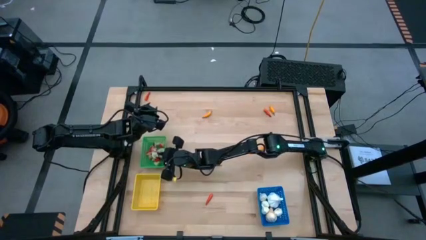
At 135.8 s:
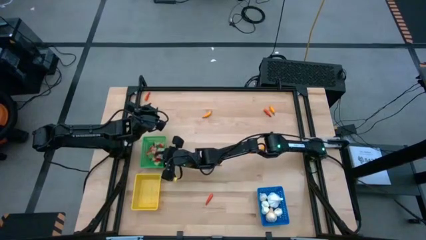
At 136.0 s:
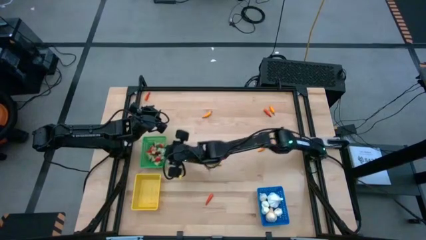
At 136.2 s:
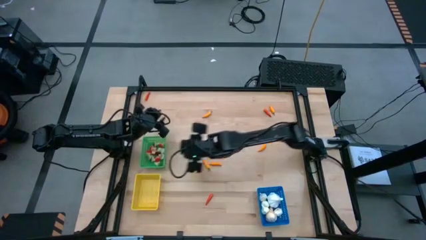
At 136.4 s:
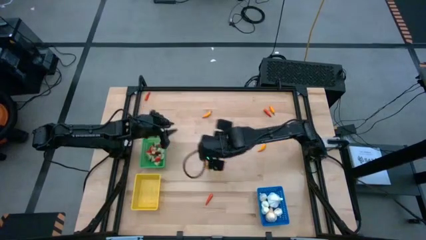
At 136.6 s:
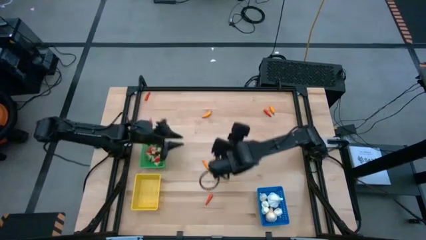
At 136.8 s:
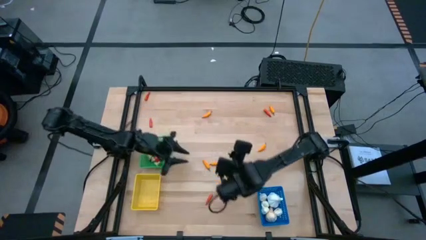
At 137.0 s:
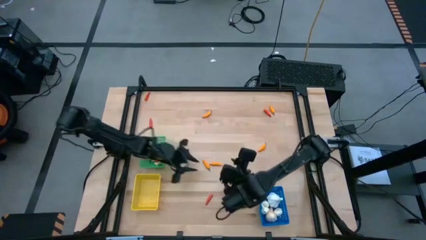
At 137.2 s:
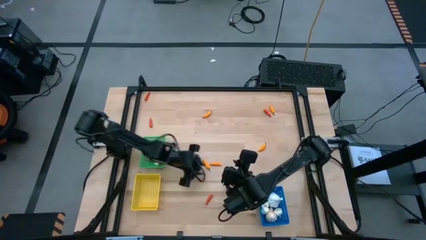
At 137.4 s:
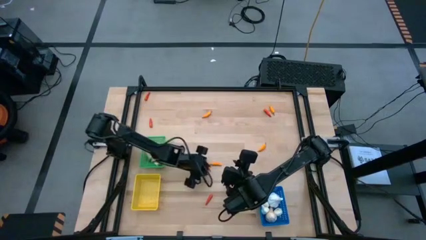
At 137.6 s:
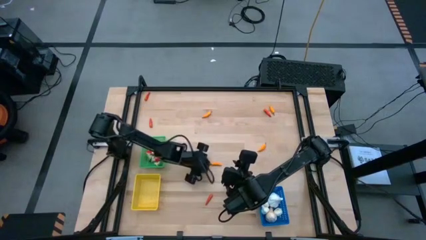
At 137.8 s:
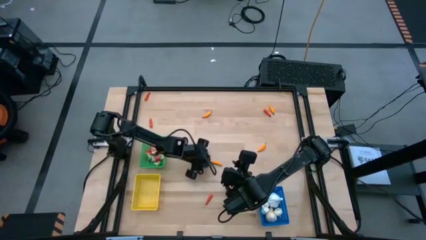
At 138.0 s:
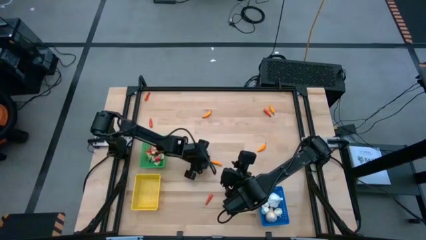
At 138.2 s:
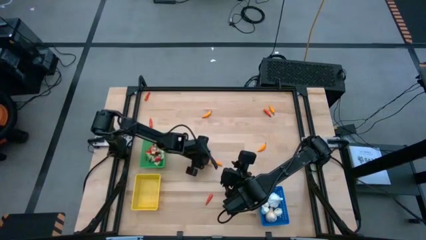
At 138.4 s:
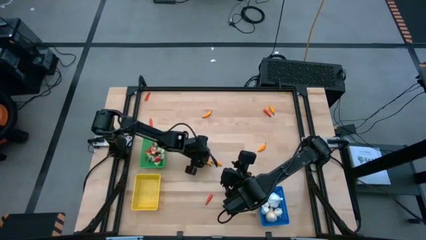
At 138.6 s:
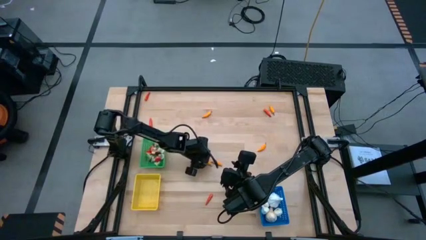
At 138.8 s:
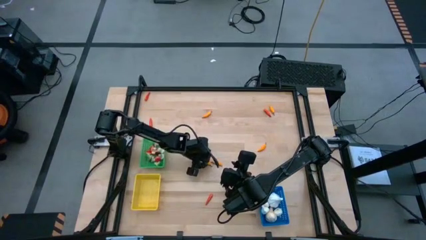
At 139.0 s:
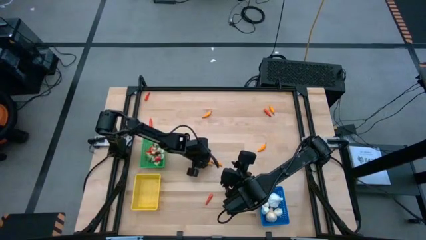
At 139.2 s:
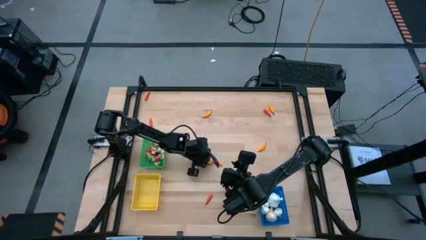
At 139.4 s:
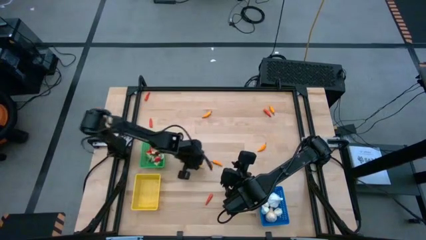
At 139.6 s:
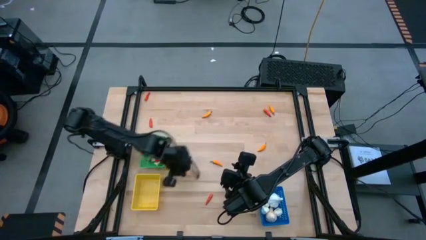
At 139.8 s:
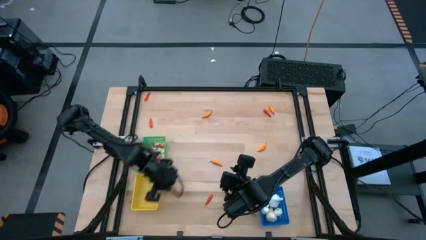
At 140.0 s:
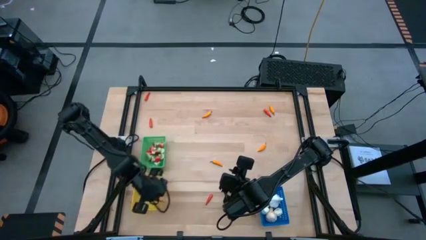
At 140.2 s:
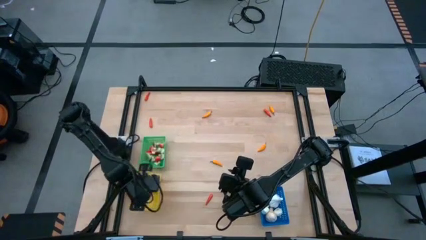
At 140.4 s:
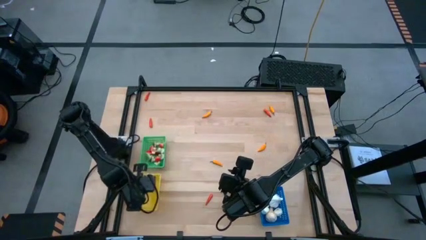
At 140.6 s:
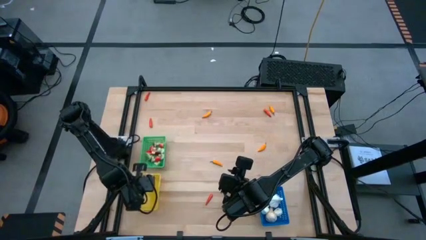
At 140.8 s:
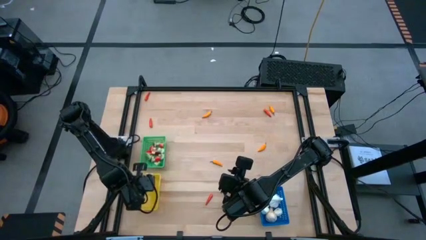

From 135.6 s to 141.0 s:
Task: Sort produce into baskets
Put the yellow chili pepper into the yellow bin

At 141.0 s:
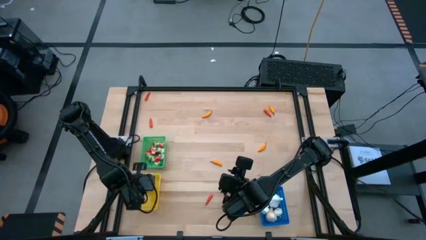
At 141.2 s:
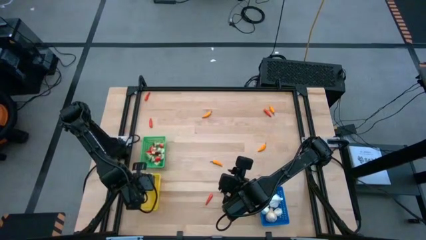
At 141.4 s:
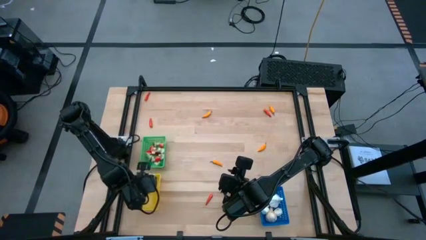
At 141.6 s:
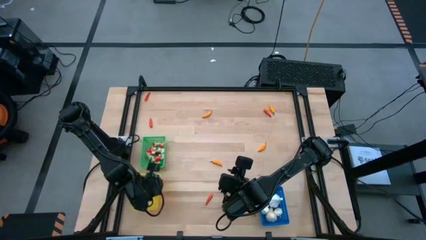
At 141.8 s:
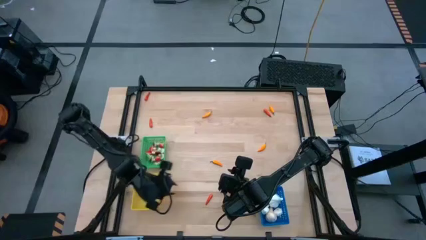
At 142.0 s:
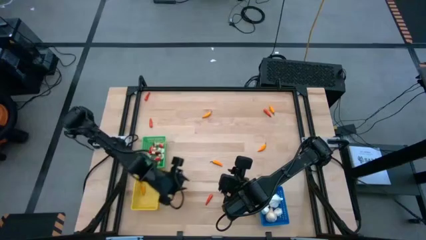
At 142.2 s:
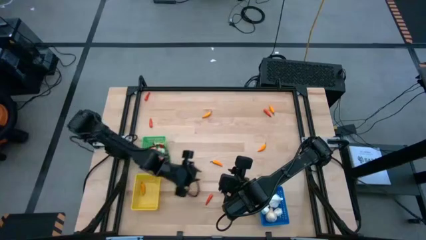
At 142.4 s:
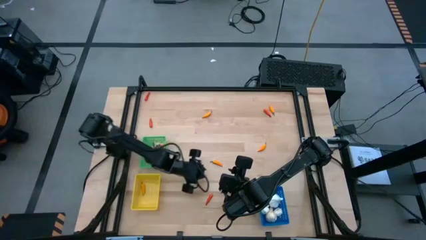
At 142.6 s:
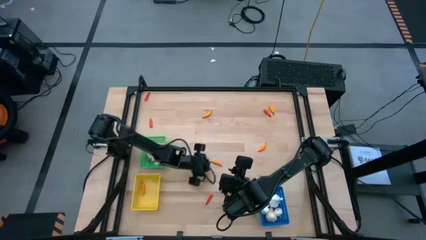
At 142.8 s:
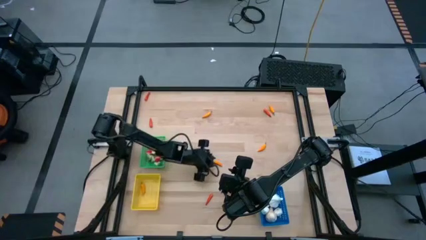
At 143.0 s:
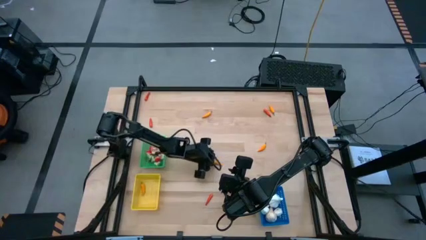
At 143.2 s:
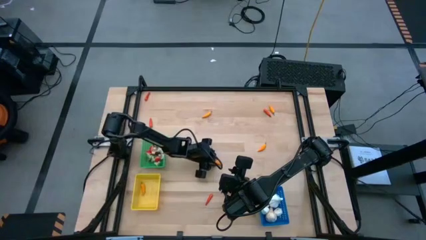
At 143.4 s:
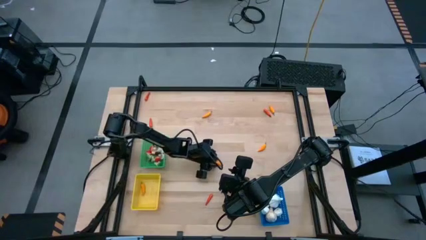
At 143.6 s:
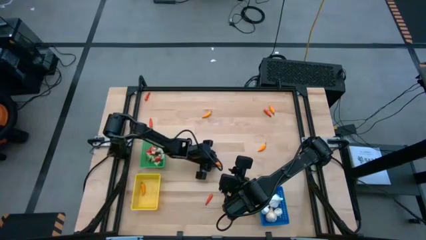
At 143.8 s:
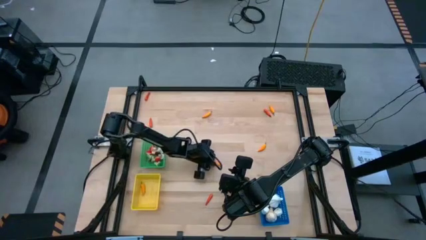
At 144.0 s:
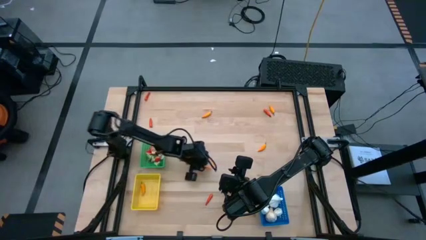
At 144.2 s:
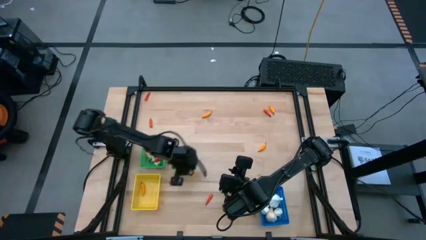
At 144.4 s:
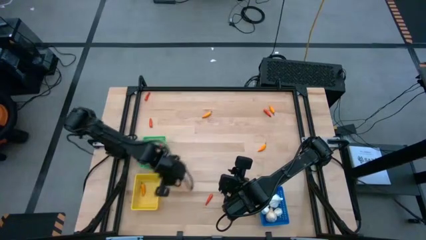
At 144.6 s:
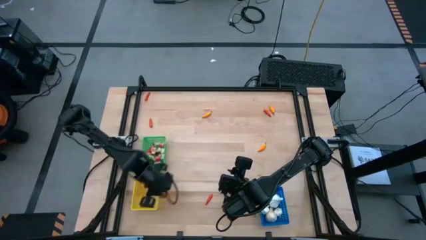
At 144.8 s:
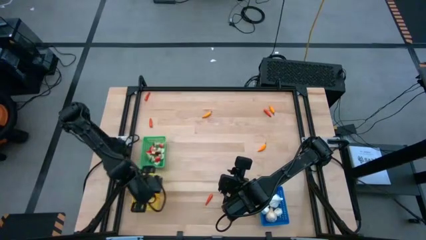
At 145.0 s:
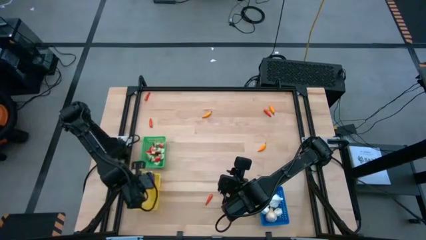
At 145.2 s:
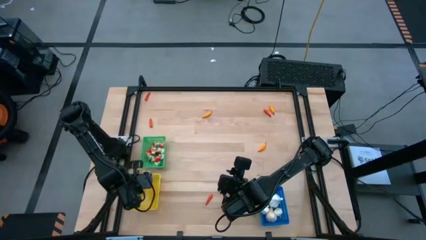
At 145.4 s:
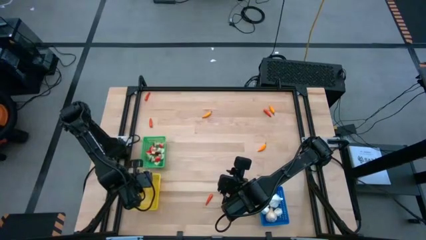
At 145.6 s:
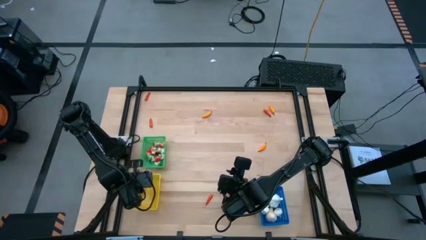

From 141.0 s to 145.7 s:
Put the yellow chili pepper into the yellow bin

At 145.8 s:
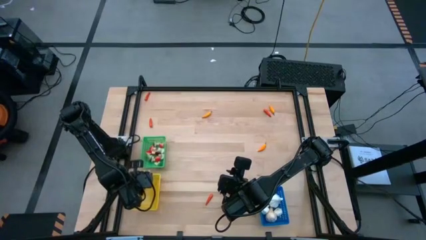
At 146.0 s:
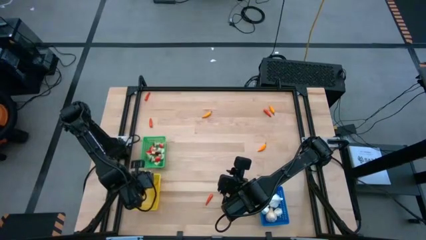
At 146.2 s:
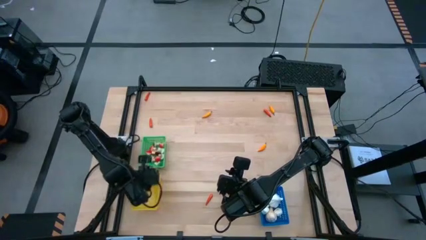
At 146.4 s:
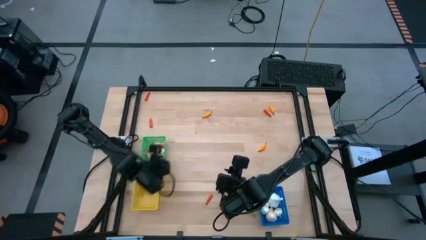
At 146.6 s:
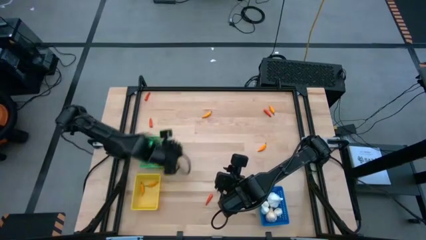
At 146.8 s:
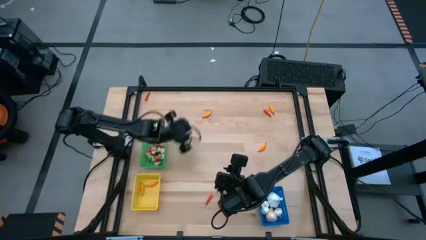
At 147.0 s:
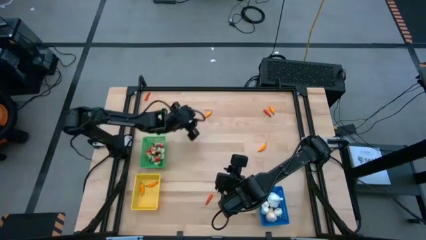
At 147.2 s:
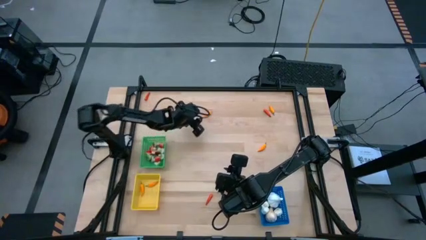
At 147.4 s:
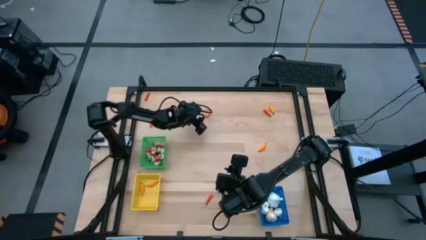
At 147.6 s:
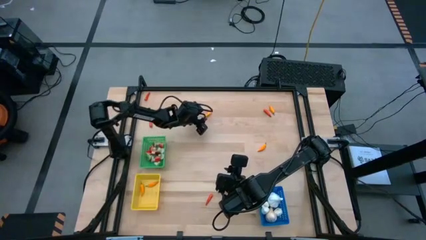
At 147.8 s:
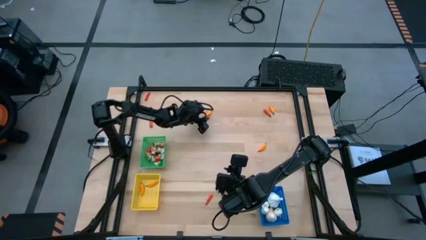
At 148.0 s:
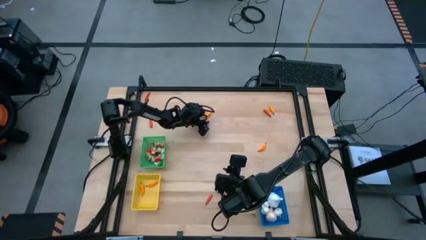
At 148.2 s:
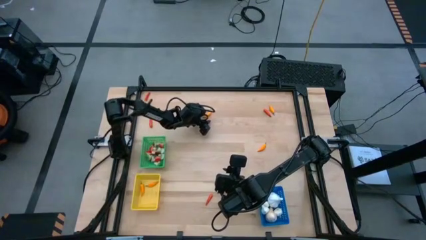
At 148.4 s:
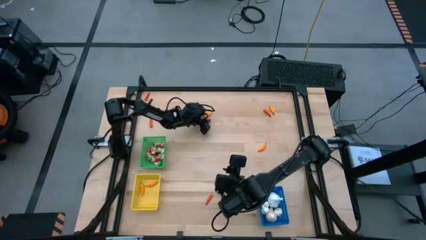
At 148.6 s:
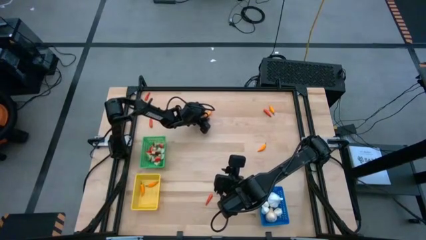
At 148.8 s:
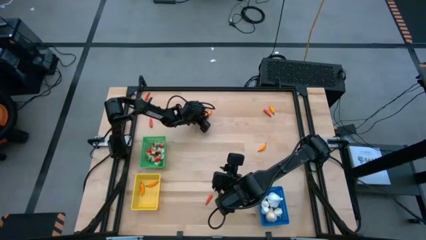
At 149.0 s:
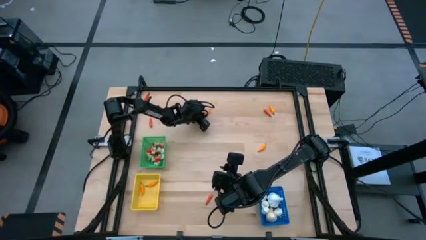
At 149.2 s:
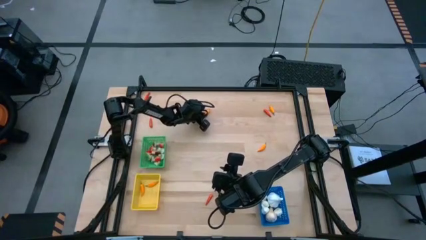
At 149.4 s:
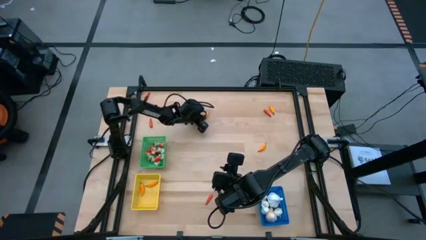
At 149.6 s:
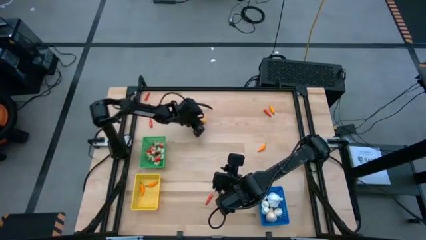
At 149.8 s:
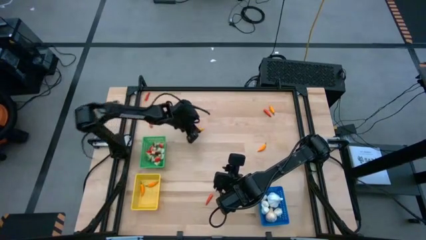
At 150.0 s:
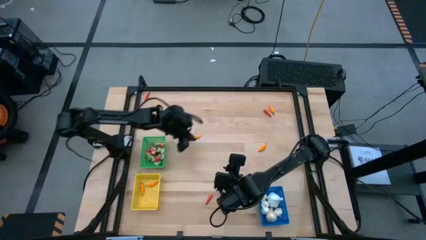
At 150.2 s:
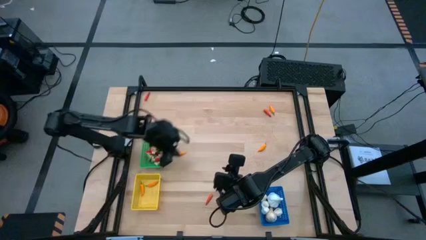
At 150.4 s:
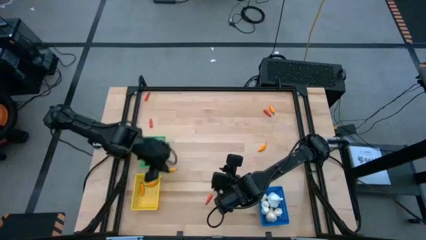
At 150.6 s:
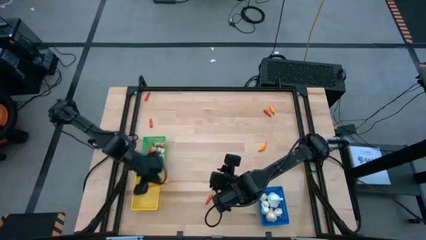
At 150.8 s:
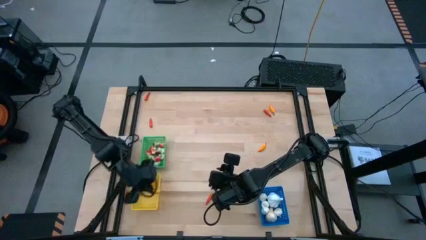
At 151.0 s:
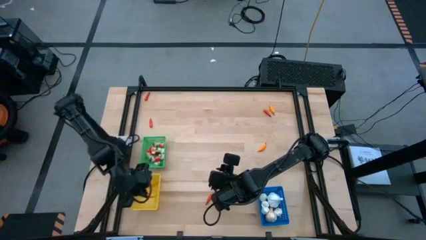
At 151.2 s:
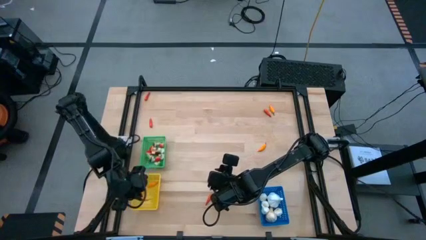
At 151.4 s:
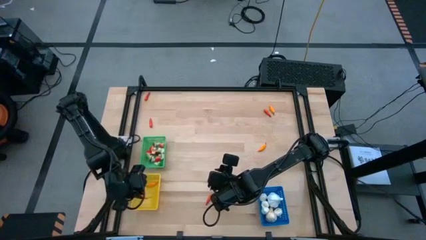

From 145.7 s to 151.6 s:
Put the yellow chili pepper into the yellow bin

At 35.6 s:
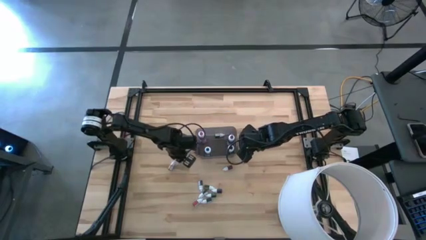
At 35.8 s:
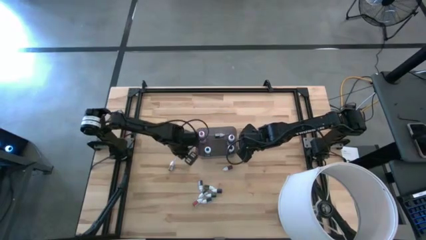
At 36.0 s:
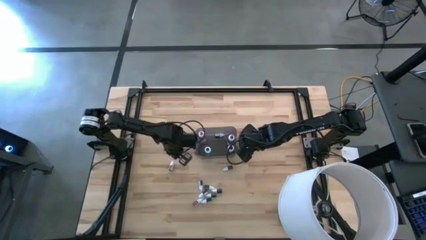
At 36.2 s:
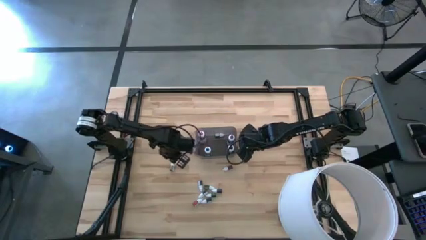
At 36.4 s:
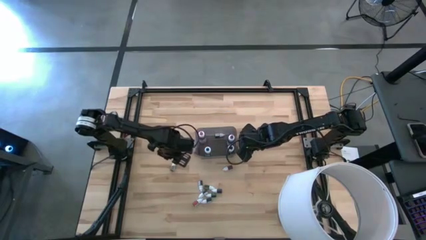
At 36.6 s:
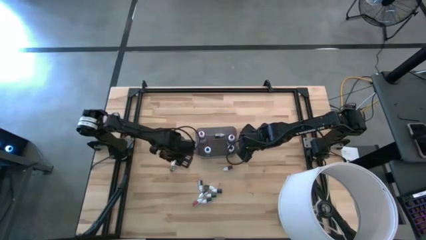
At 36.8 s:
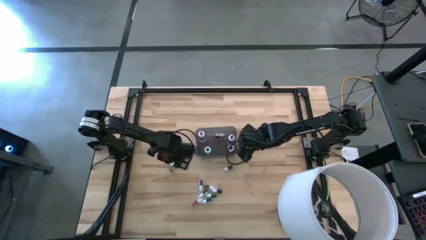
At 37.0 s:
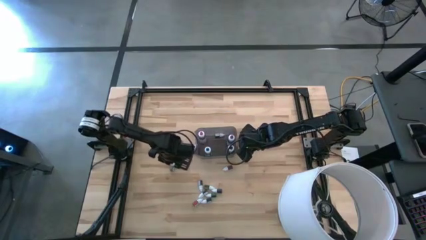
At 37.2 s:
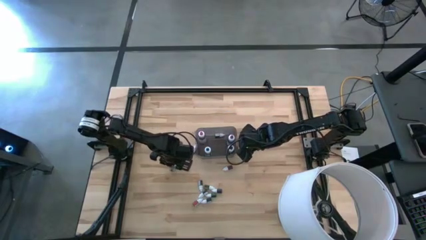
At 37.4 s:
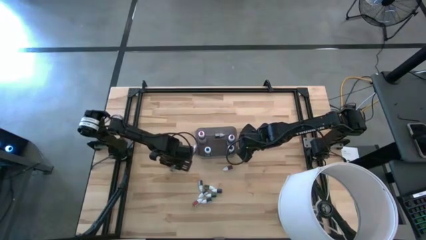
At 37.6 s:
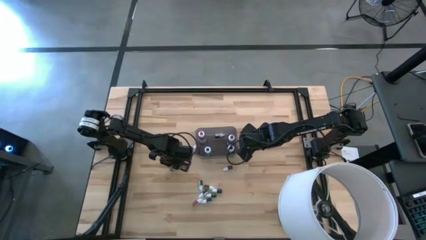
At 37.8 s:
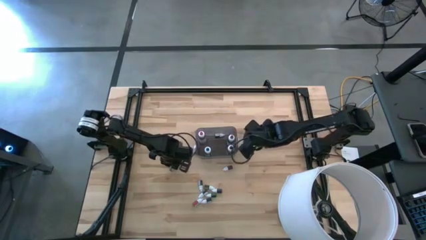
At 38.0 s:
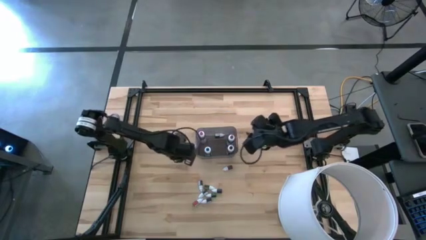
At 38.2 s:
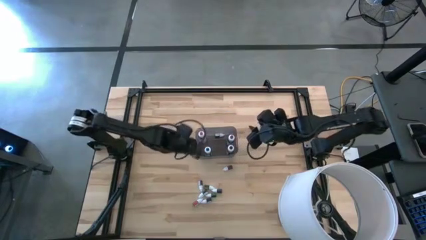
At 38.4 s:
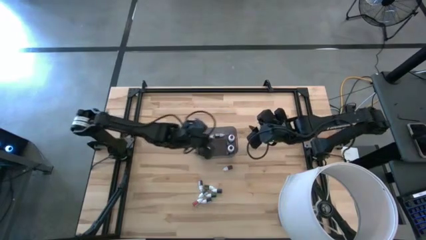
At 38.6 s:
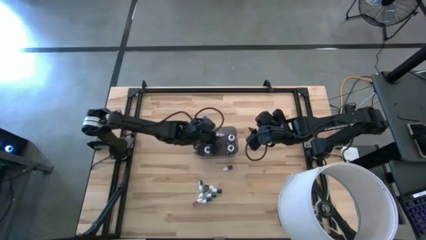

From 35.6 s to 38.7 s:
Task: Pick & Place food coloring
Put the top small green food coloring bottle in the black bin
